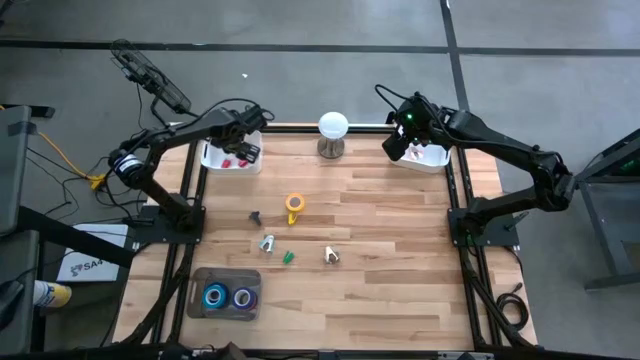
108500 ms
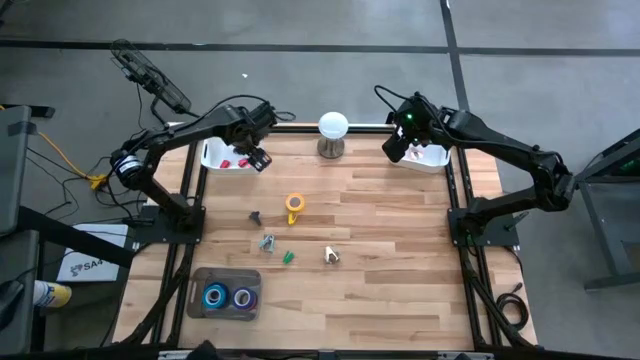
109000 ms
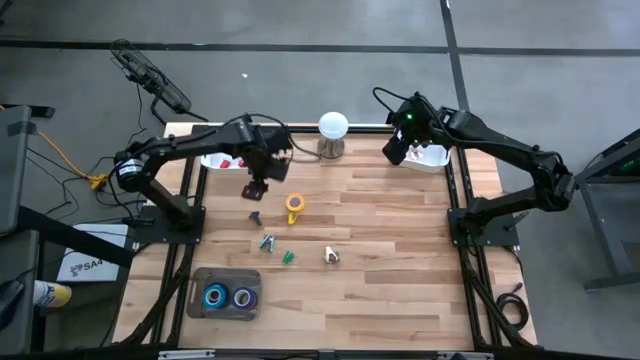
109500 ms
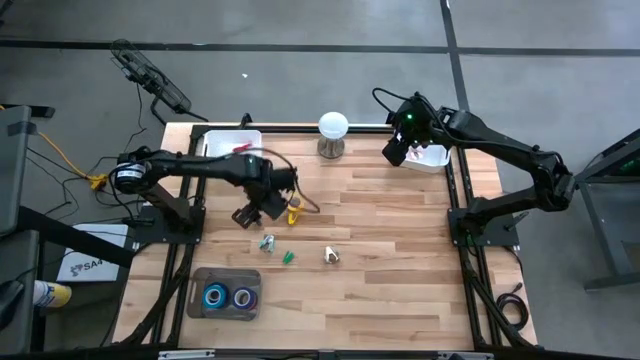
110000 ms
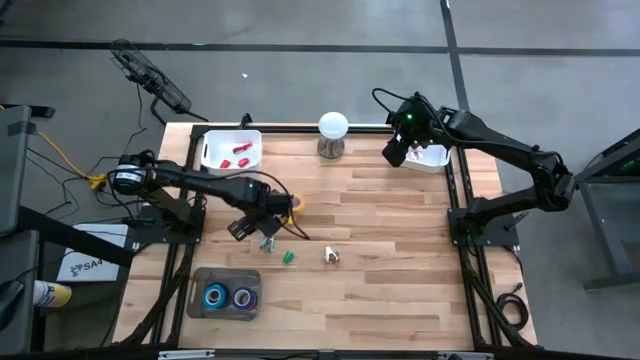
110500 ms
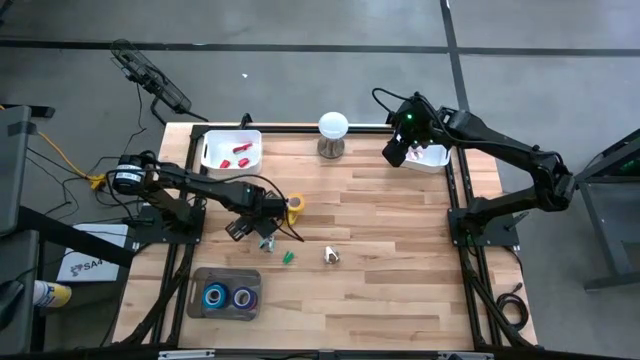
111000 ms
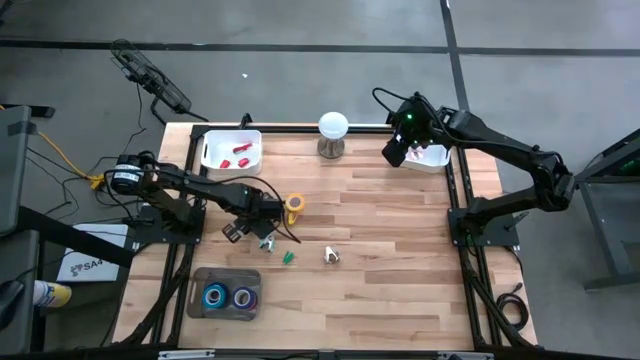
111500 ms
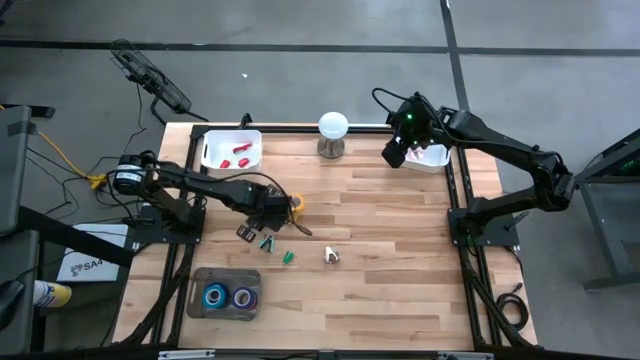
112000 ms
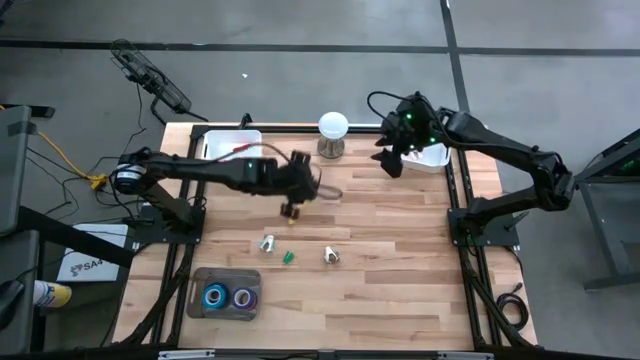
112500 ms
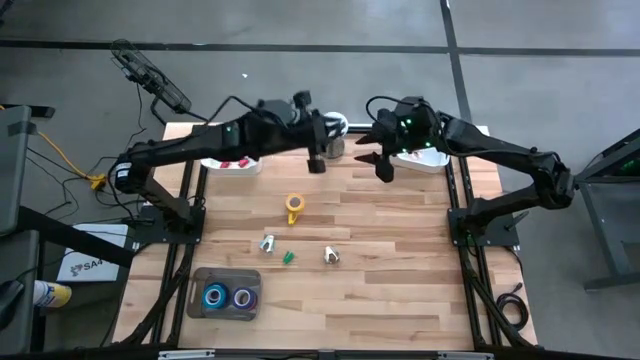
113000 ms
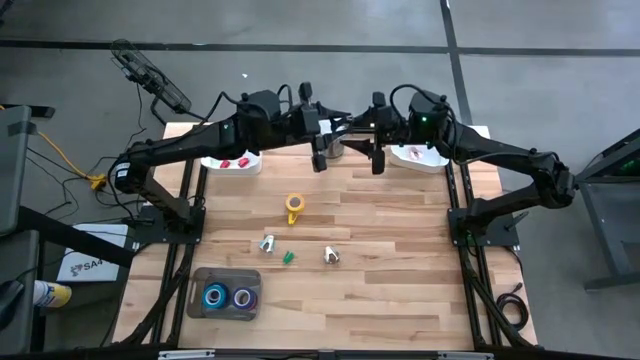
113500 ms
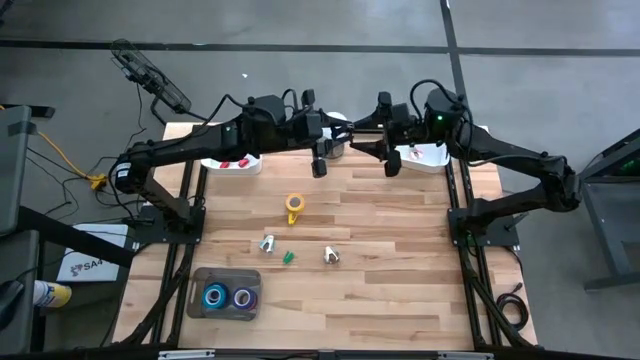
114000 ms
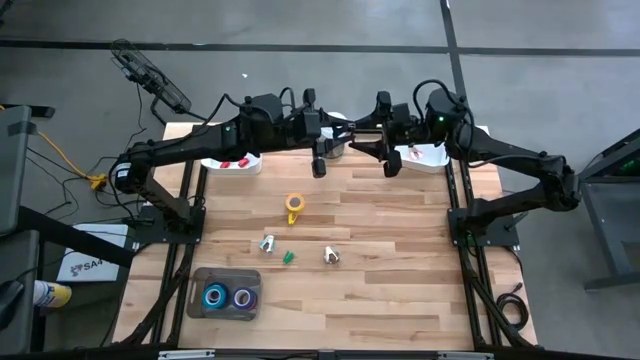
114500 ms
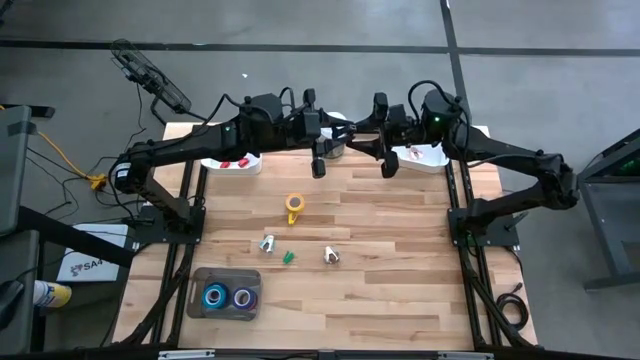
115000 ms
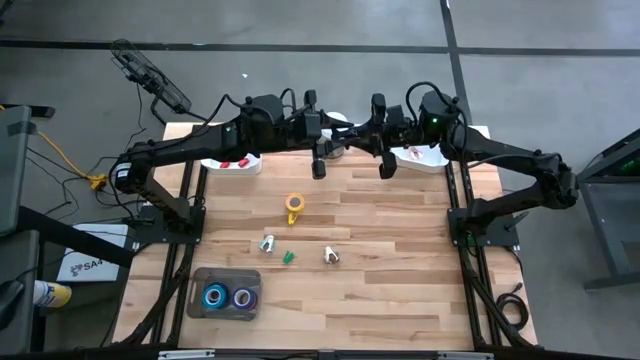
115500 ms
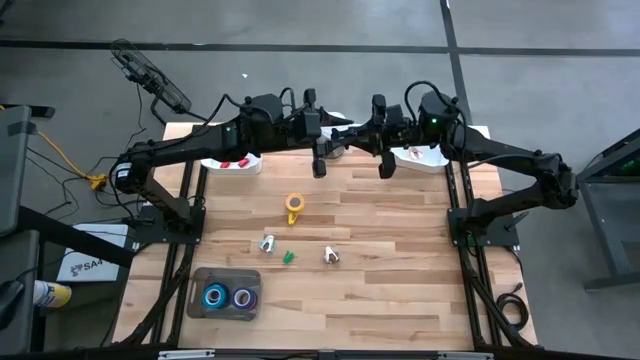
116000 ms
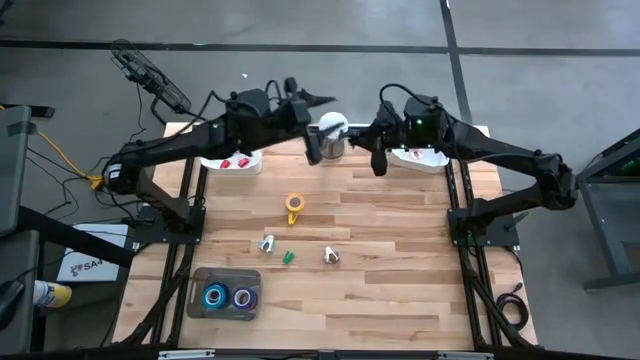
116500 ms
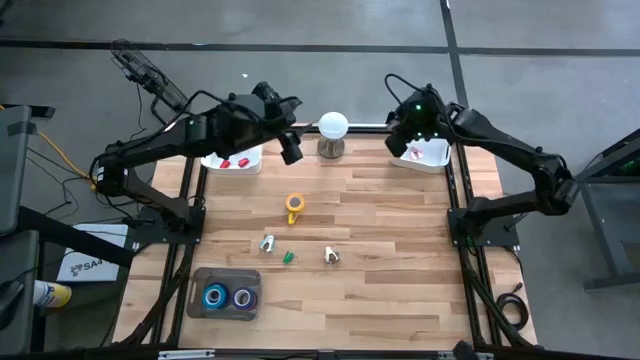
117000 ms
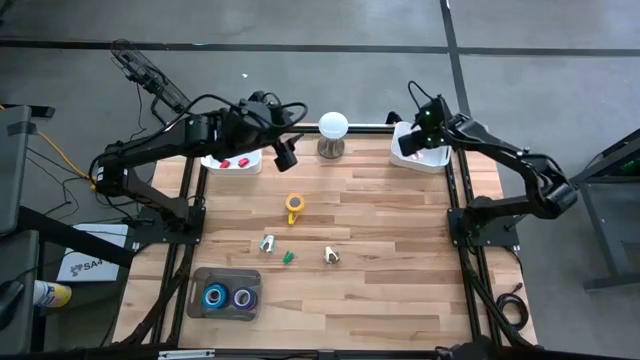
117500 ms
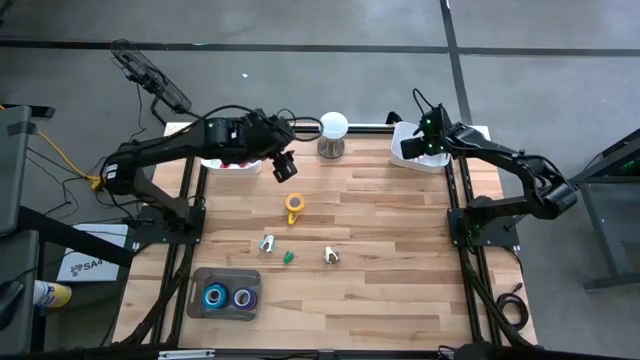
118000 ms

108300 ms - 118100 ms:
Task: Pick and place Stapler, Stapler remover, tape
Put the black staple remover into the right white bin

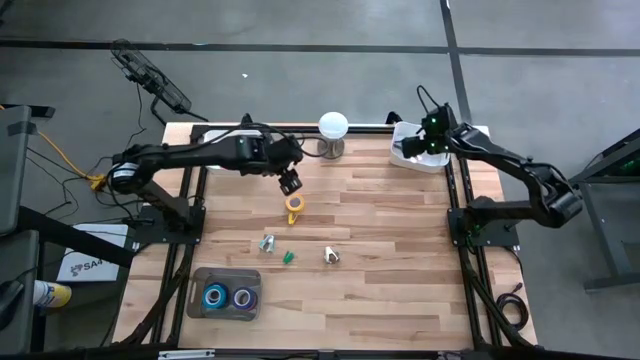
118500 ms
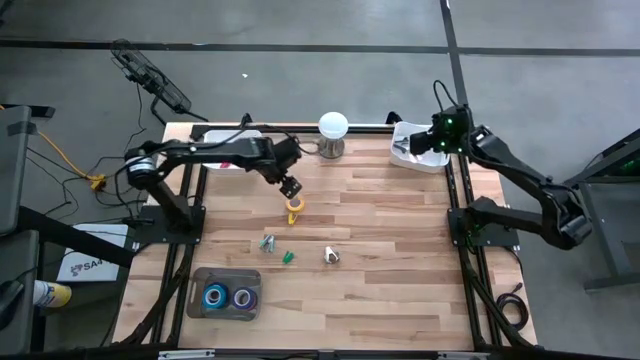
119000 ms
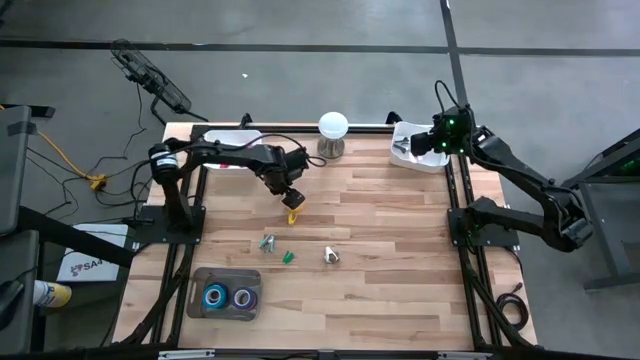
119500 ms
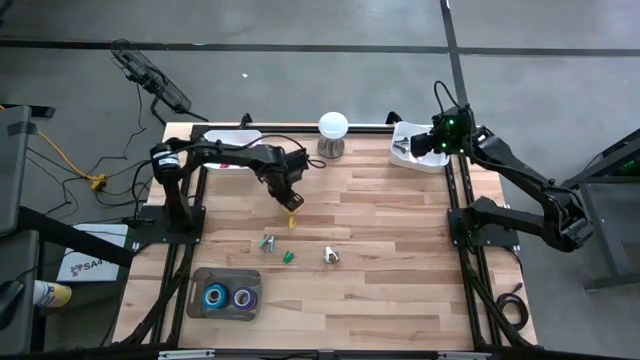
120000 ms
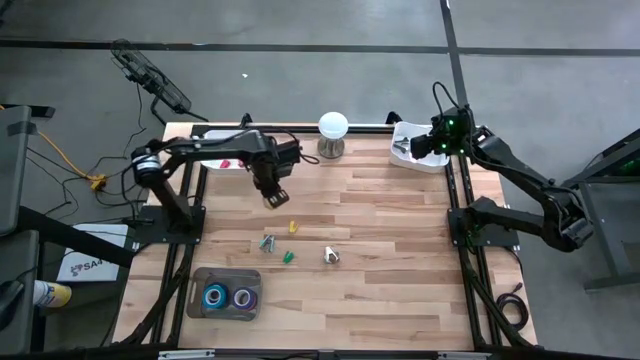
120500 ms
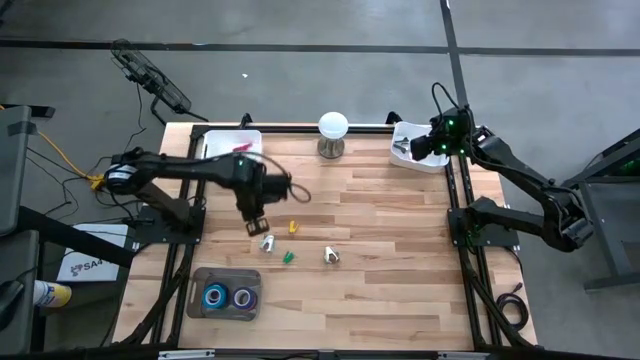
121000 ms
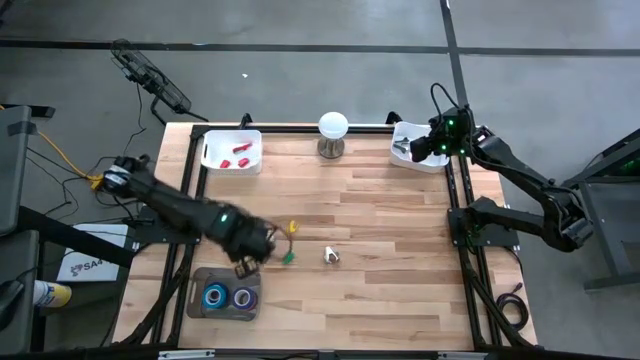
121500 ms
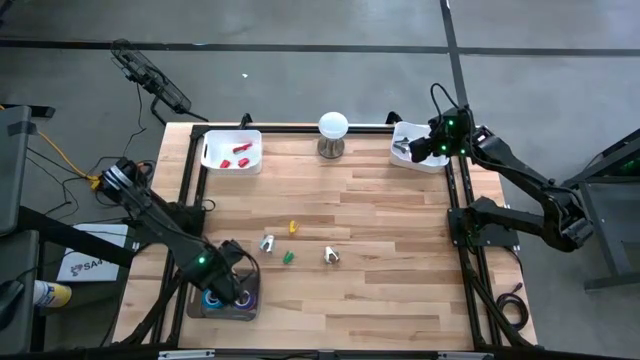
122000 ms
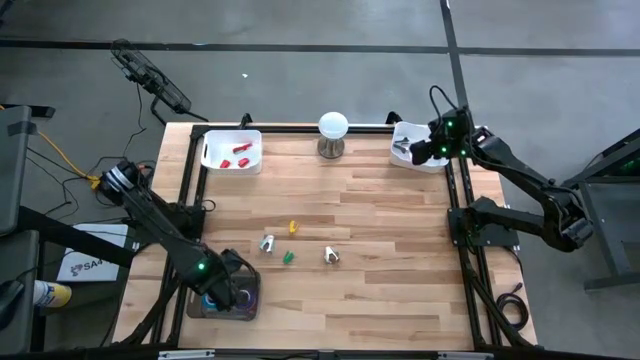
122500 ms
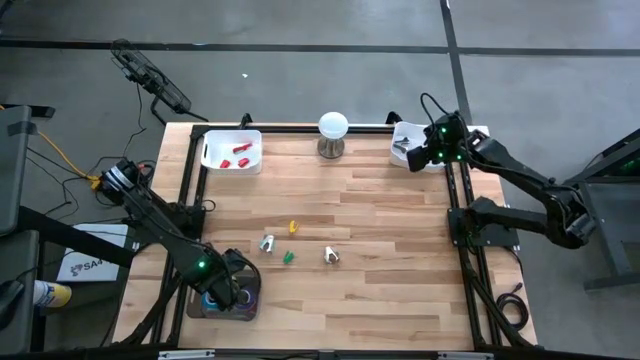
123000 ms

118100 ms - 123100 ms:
Put the yellow tape into the black bin

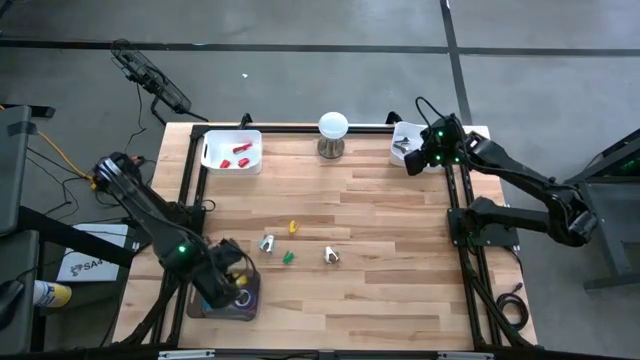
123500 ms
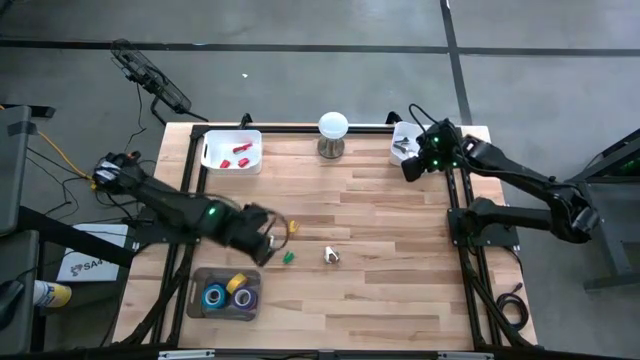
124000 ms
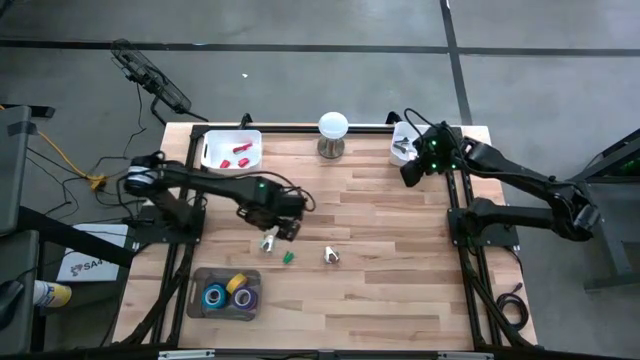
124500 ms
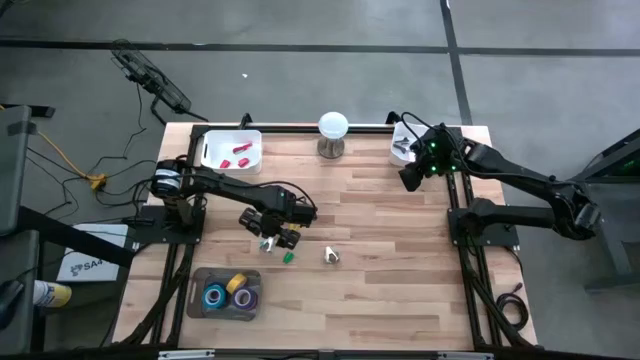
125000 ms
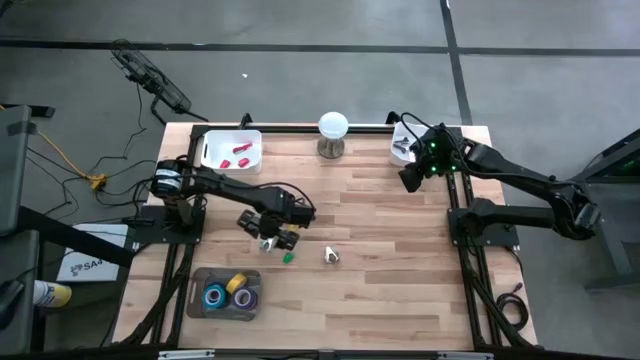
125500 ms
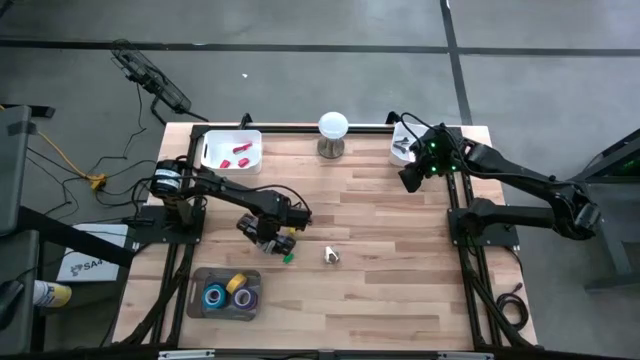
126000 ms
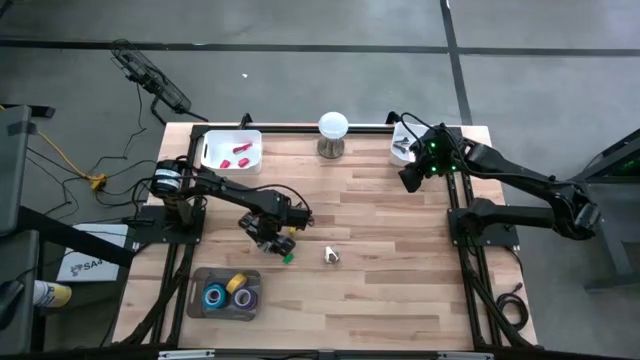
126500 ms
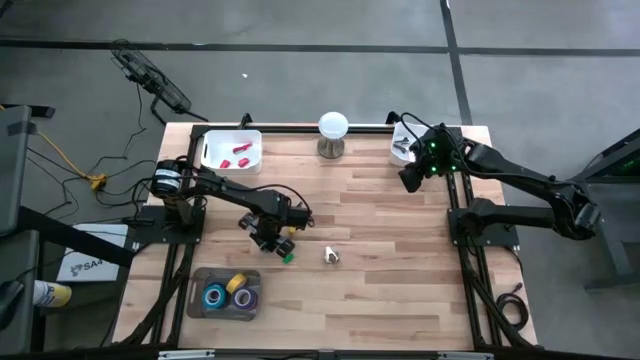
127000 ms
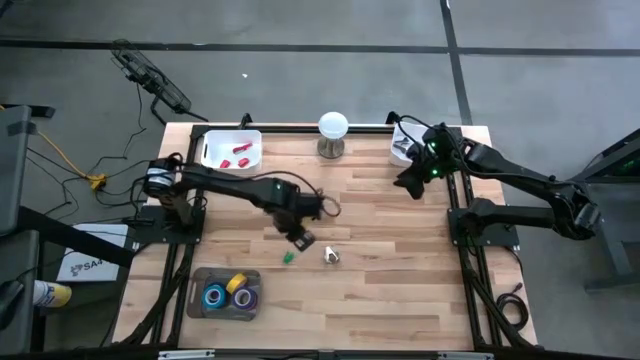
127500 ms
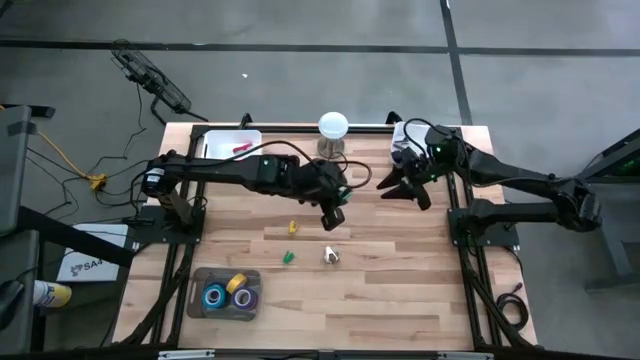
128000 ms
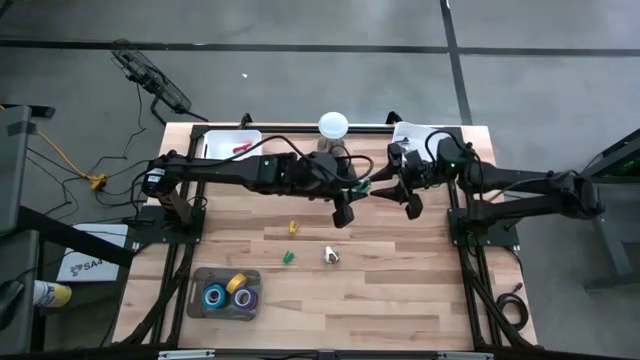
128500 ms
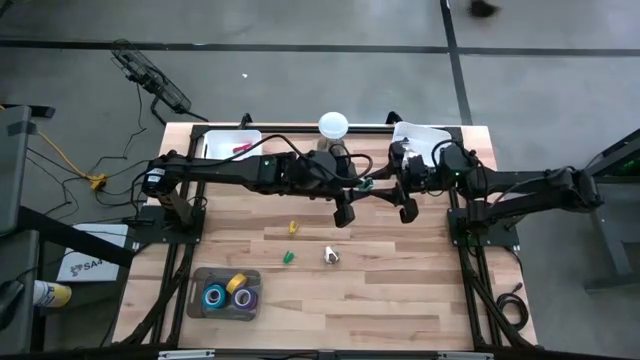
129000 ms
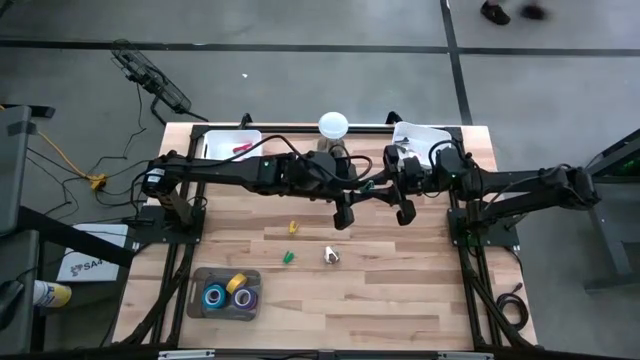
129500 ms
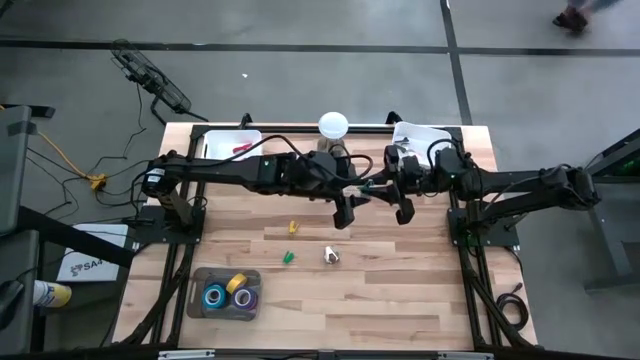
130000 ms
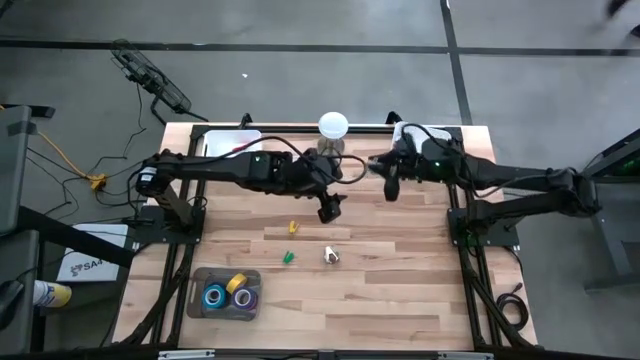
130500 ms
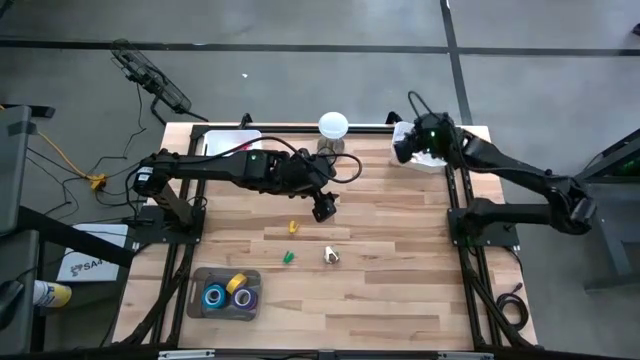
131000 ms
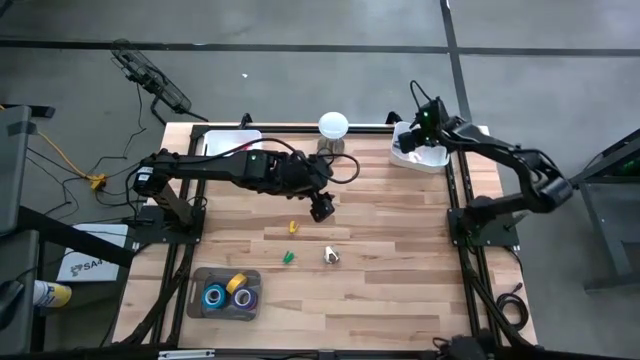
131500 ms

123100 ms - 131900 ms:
Put the light blue staple remover into the right white bin
